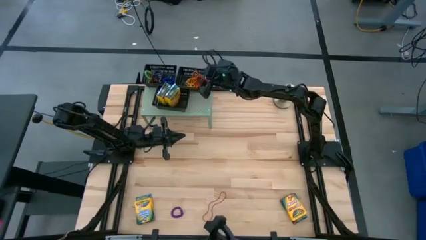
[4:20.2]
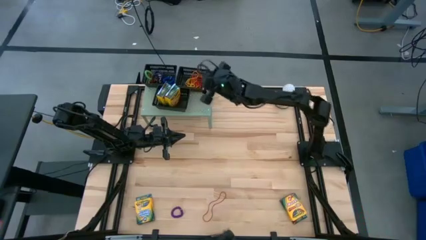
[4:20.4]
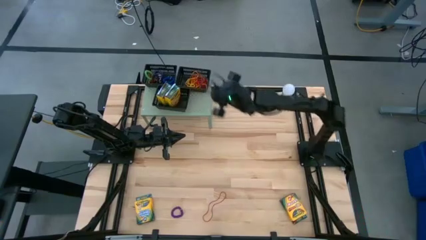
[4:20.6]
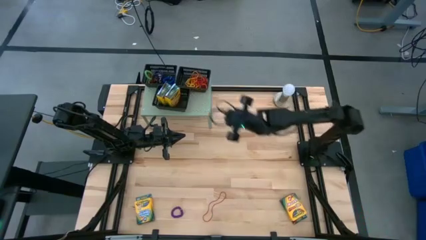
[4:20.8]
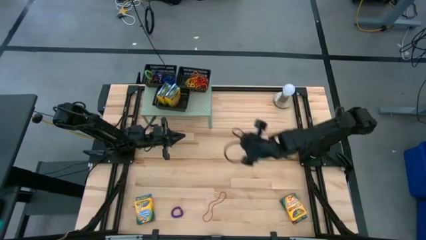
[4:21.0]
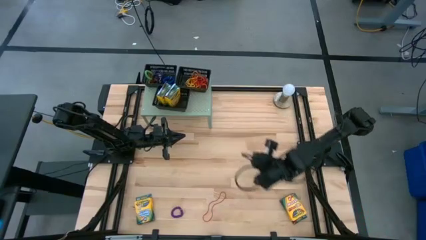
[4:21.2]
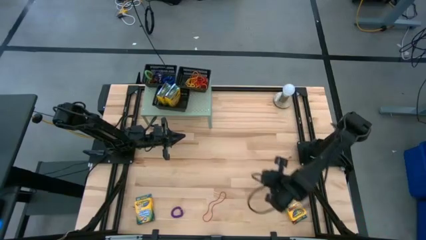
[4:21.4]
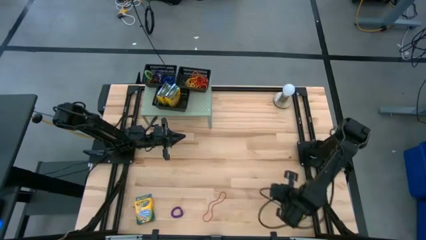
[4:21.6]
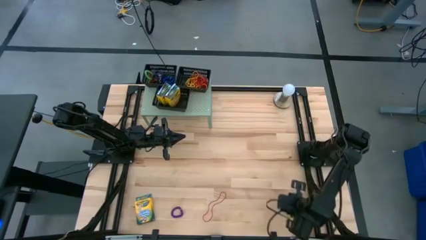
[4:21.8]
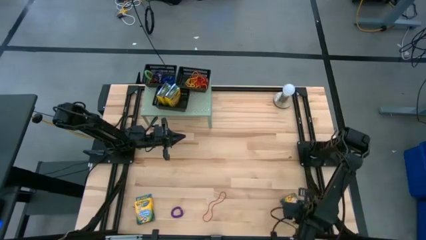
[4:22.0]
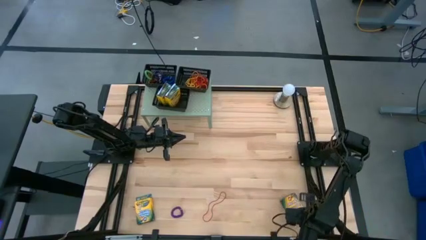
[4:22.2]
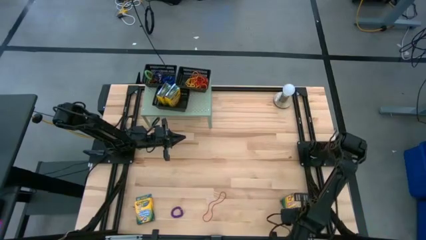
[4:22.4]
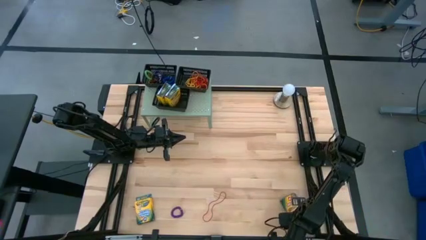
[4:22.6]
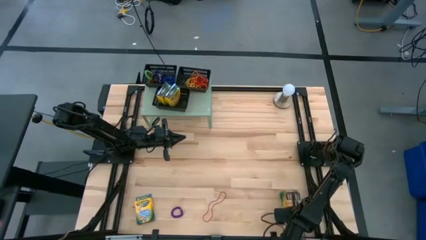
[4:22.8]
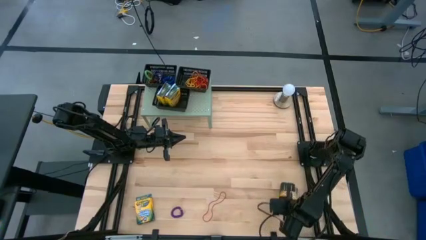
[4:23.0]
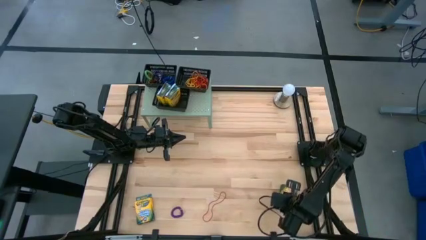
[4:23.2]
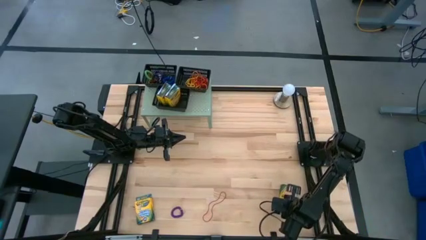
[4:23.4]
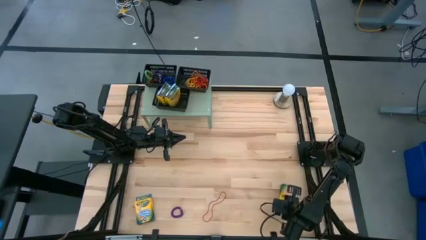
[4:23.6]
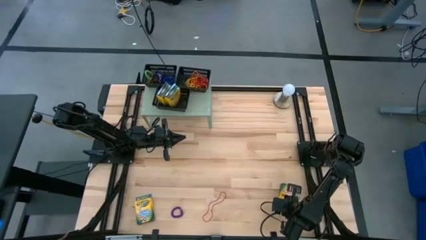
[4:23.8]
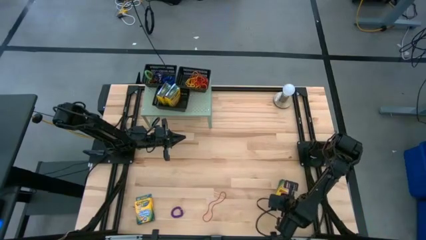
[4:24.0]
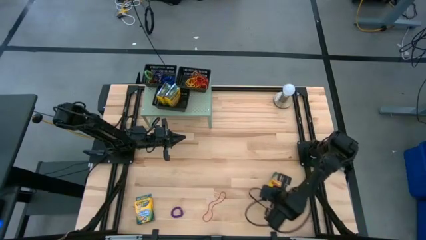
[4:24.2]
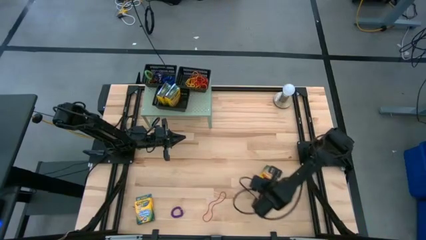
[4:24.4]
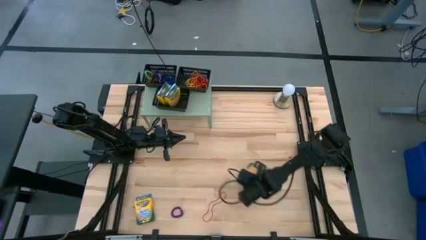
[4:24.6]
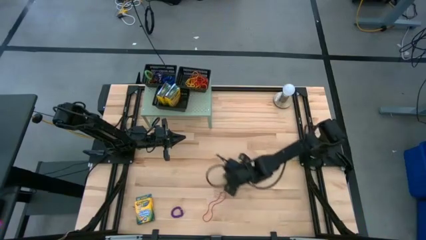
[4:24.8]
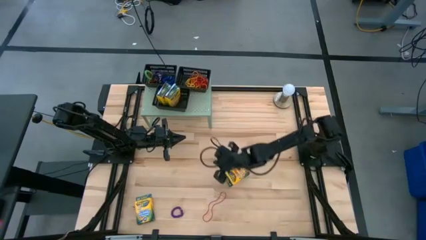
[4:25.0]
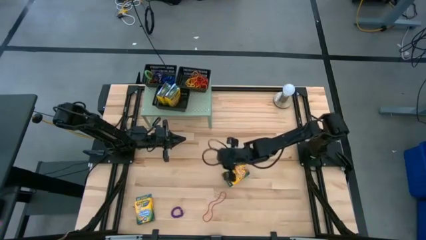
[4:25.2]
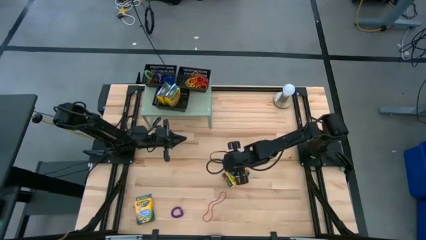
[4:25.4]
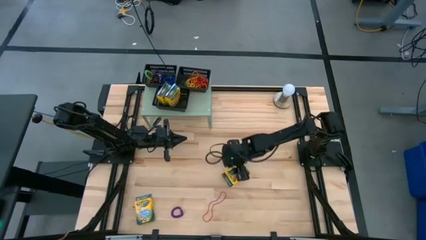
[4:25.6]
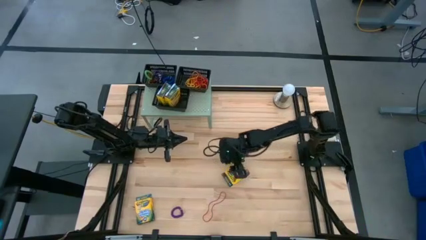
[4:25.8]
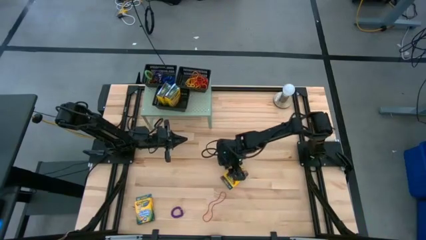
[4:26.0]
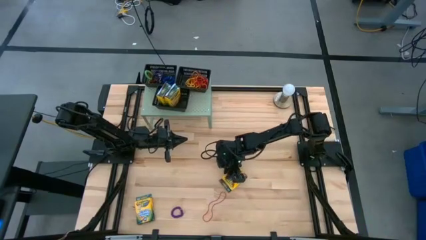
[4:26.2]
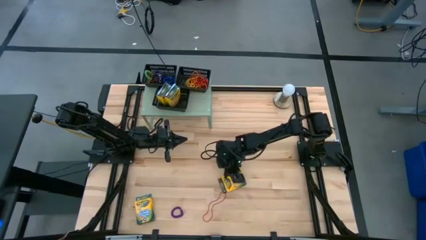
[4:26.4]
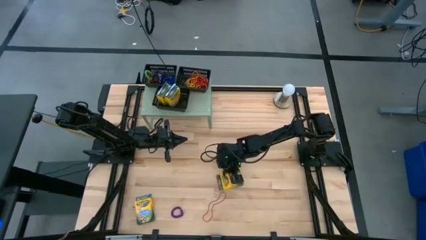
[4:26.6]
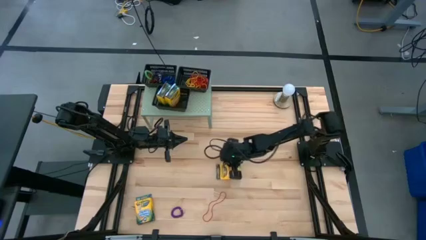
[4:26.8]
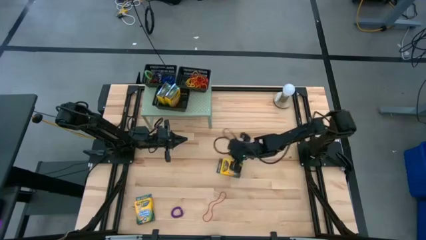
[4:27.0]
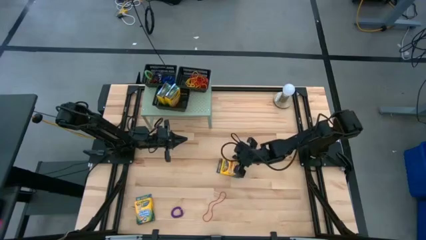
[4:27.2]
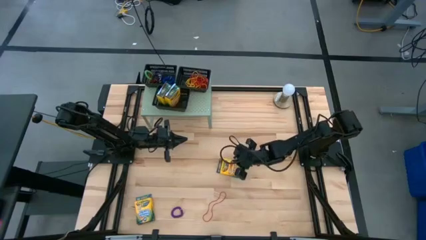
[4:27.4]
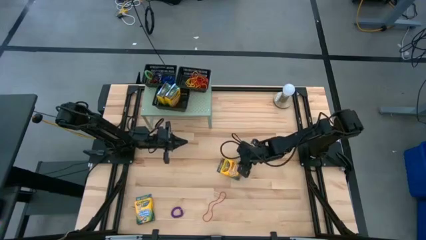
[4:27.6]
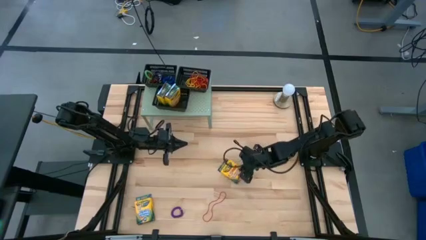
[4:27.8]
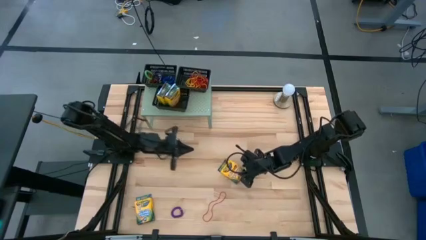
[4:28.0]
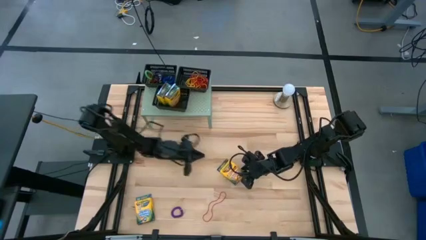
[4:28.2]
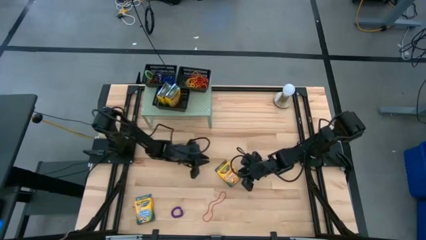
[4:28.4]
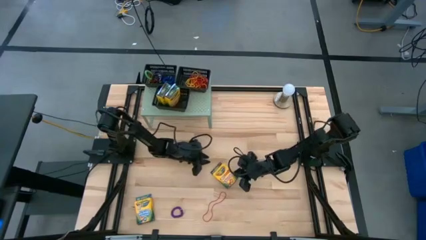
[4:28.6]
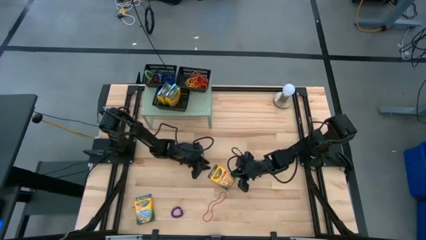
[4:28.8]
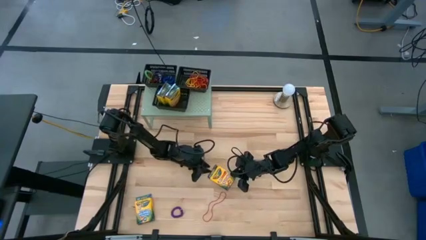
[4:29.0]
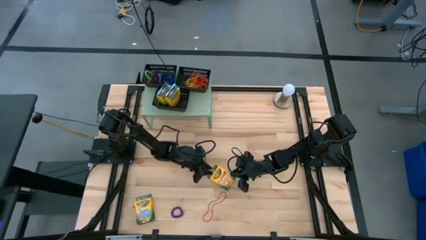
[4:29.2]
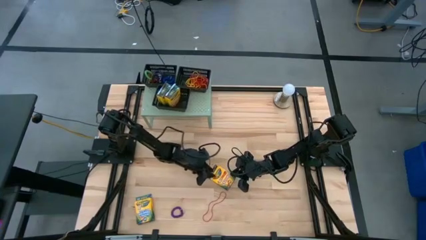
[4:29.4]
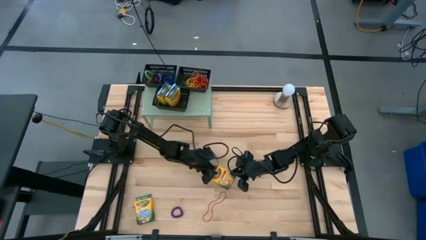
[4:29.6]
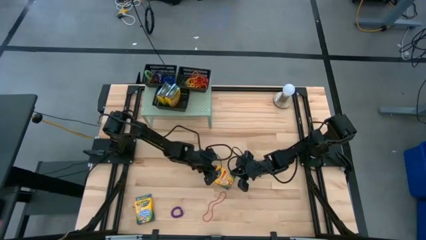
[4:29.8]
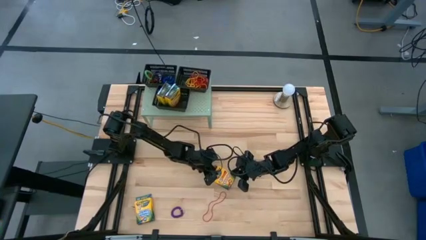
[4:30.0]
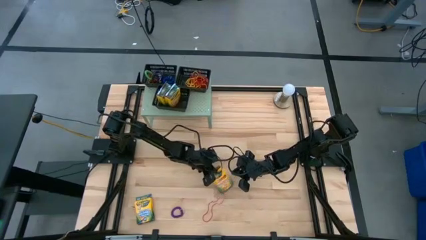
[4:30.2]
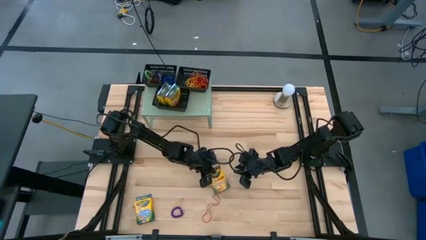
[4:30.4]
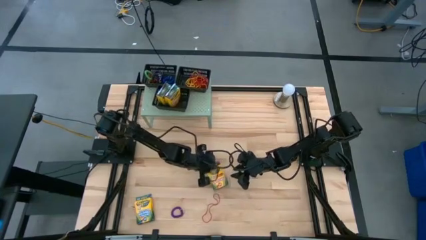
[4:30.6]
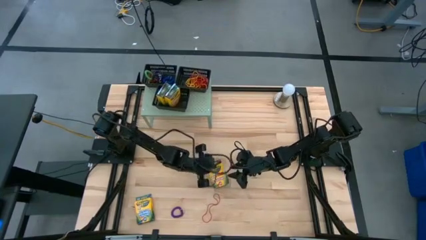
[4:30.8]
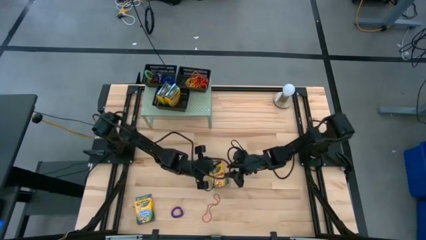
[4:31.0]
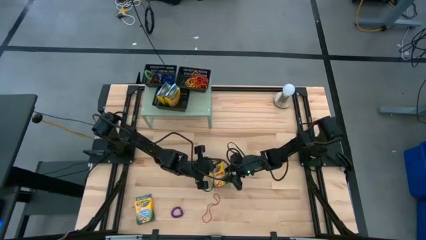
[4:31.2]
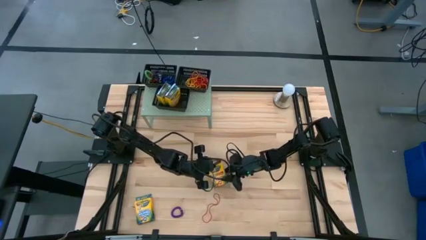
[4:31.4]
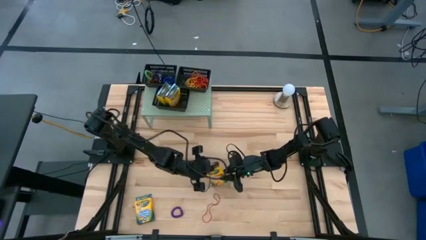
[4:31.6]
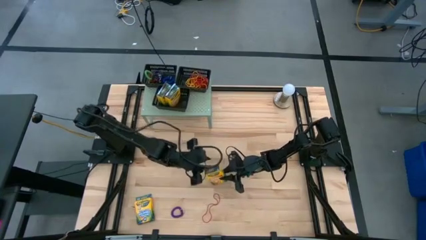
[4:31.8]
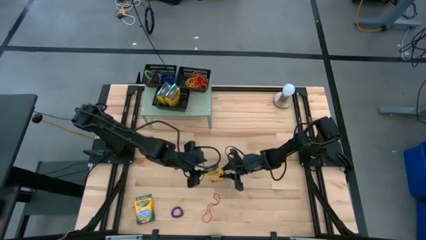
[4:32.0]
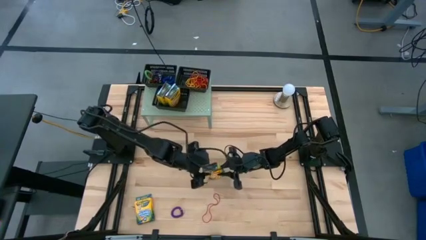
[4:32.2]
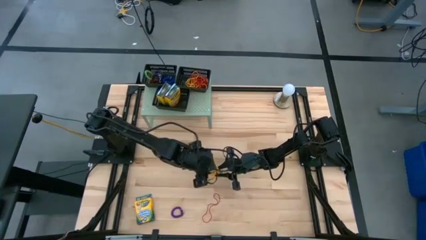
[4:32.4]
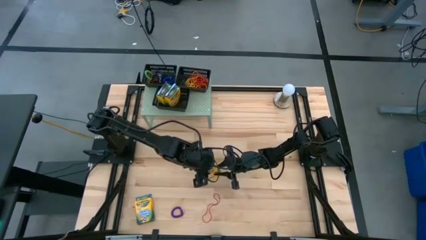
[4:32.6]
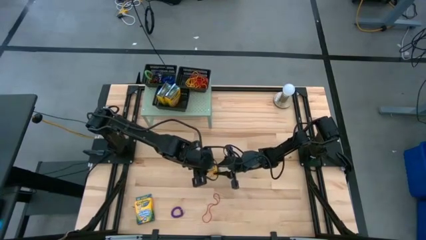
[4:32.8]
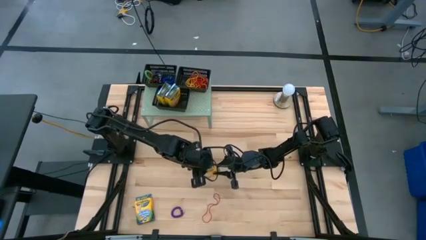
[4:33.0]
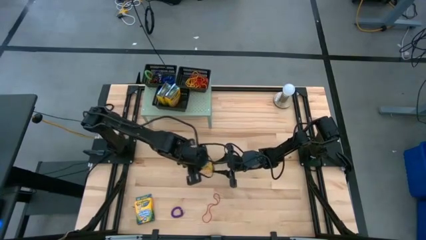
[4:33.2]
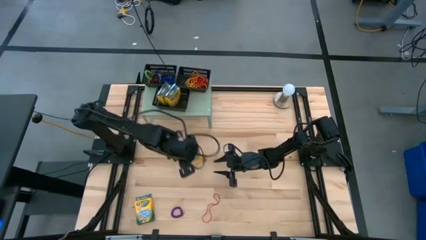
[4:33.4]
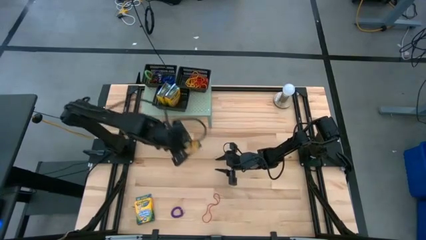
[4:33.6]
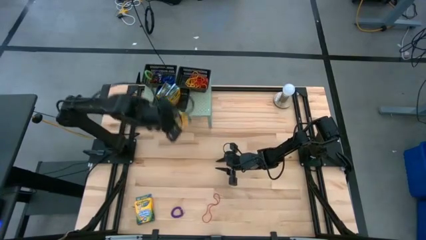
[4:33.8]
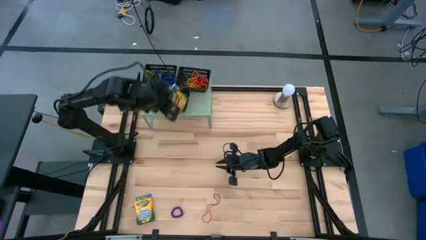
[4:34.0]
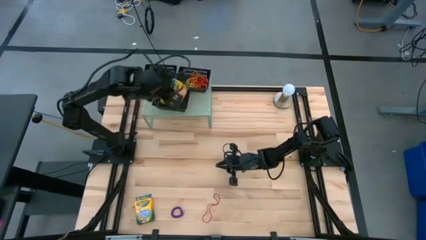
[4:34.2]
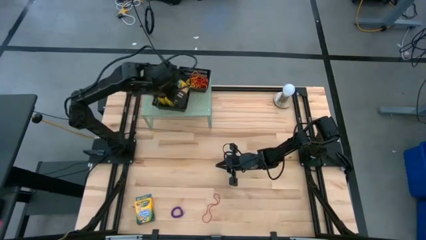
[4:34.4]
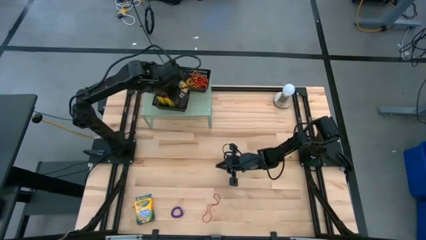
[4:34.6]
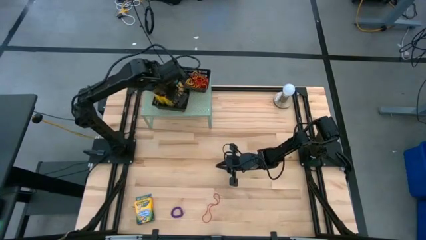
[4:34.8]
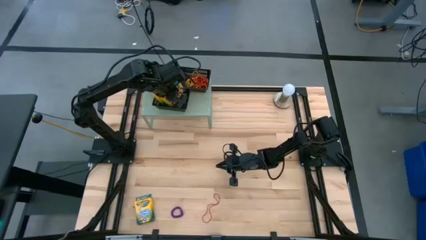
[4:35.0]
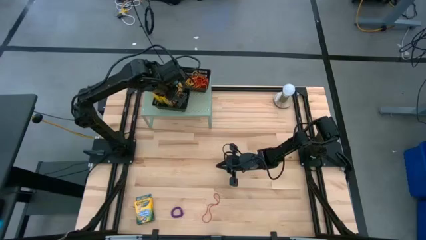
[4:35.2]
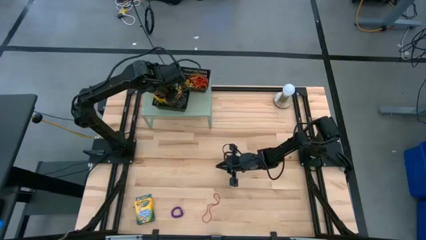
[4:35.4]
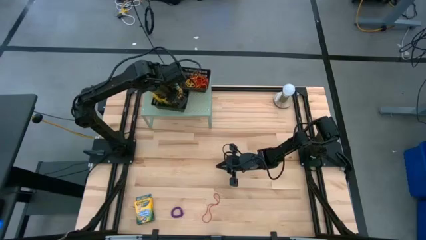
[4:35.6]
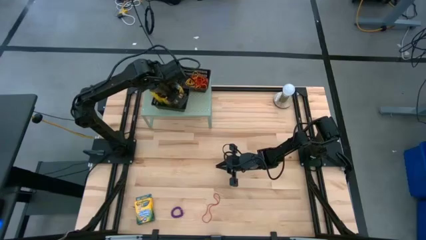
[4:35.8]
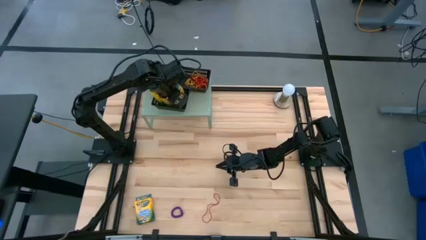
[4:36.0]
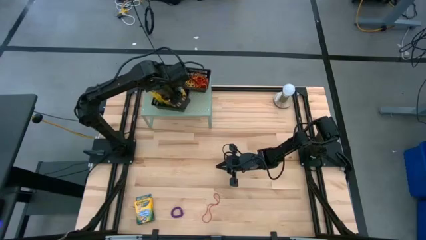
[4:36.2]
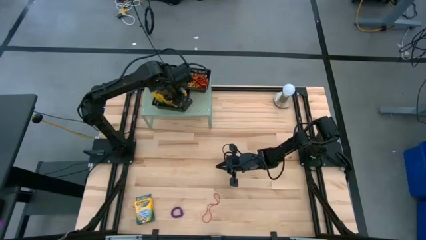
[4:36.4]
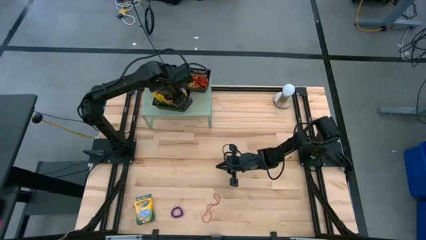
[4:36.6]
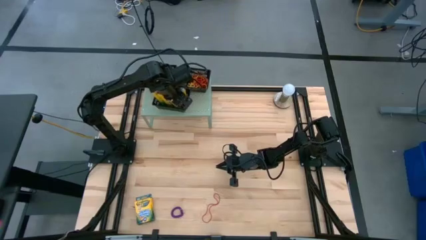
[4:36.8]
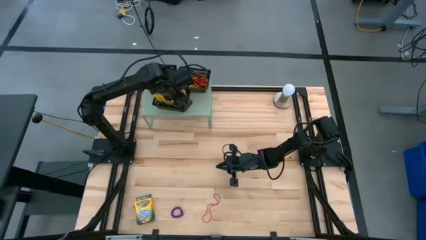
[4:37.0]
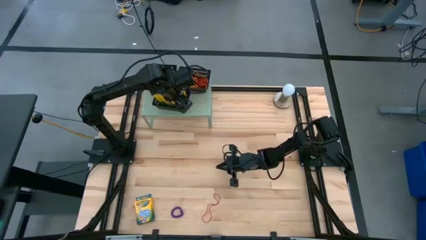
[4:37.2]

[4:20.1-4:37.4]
Task: Pick & Place Office Desk Supplies
Put the yellow crayon box into the bottom black bin
